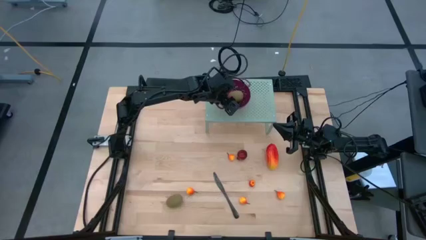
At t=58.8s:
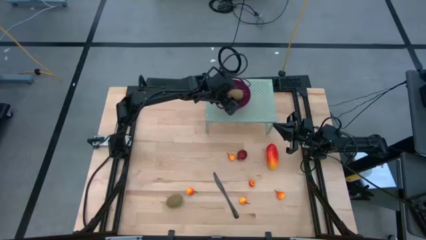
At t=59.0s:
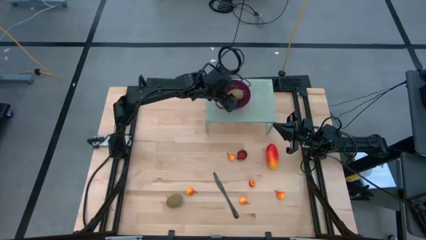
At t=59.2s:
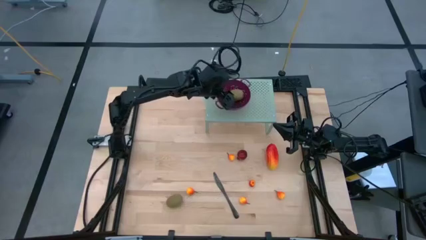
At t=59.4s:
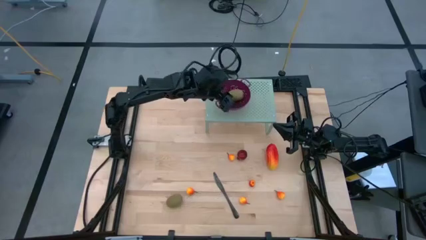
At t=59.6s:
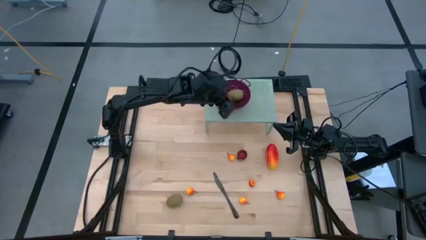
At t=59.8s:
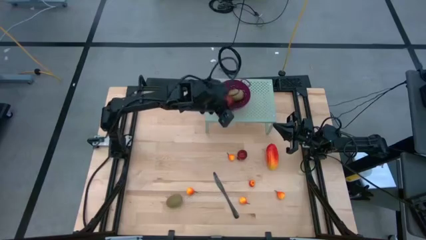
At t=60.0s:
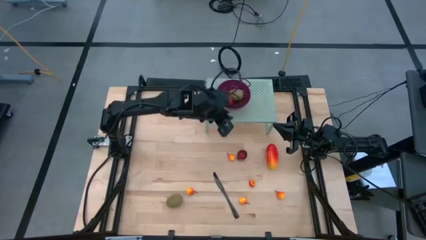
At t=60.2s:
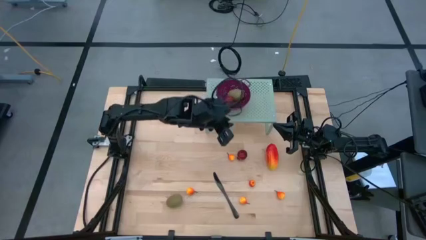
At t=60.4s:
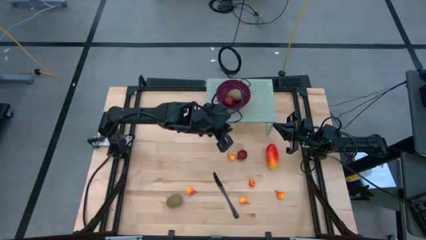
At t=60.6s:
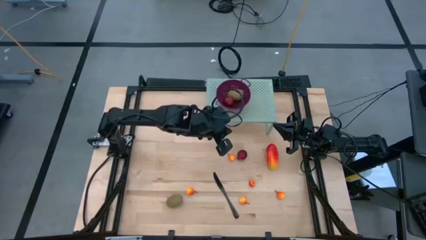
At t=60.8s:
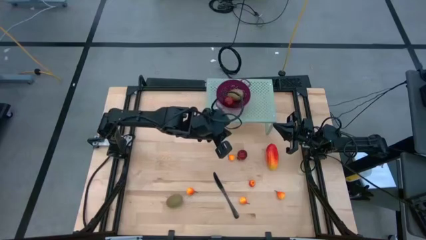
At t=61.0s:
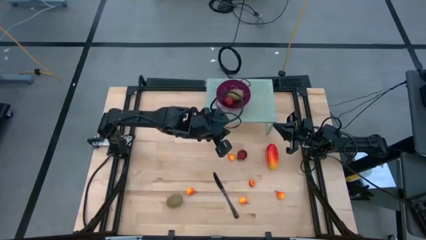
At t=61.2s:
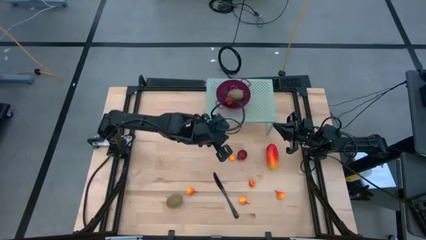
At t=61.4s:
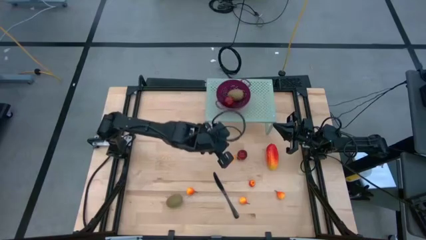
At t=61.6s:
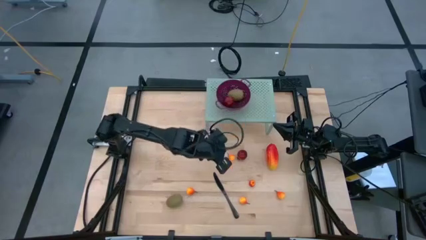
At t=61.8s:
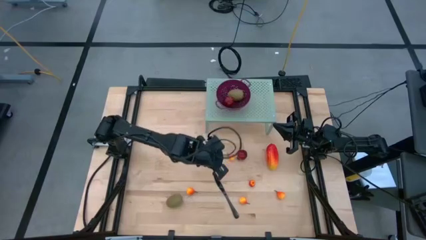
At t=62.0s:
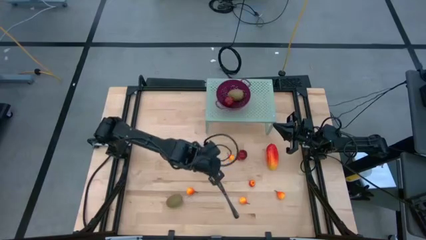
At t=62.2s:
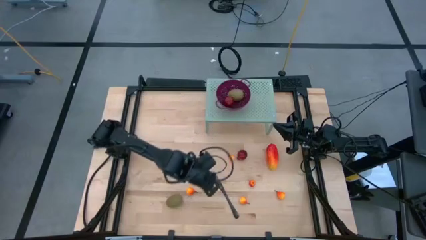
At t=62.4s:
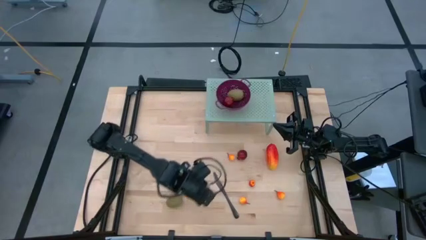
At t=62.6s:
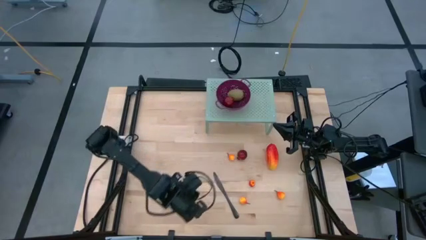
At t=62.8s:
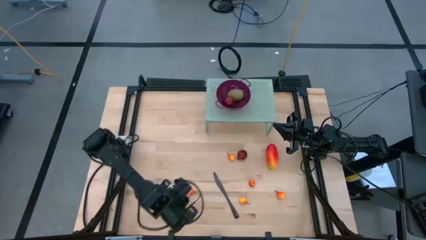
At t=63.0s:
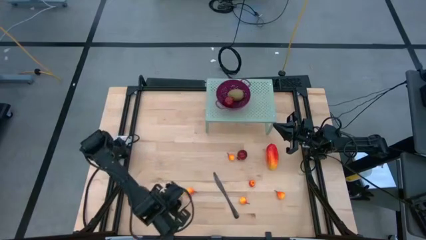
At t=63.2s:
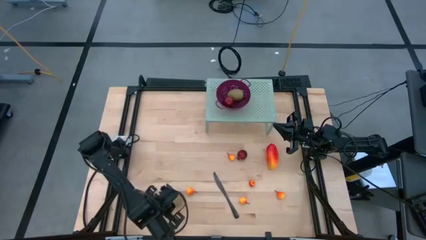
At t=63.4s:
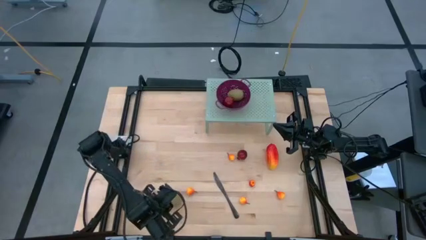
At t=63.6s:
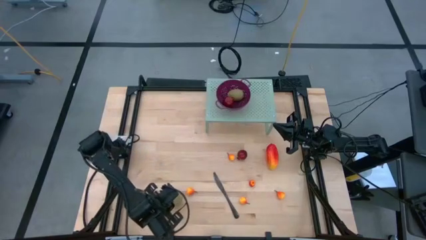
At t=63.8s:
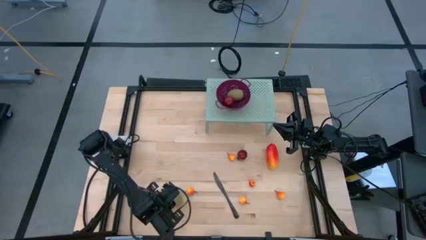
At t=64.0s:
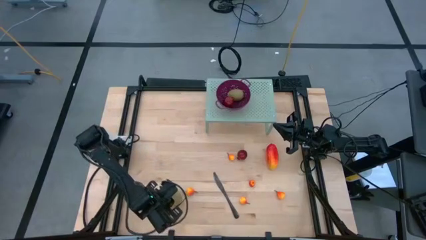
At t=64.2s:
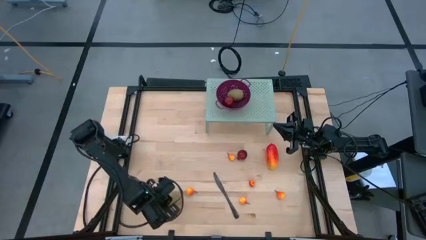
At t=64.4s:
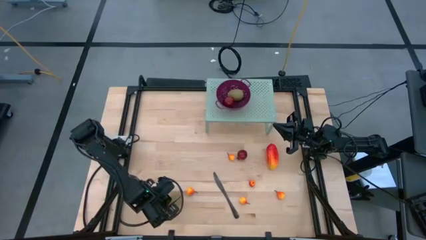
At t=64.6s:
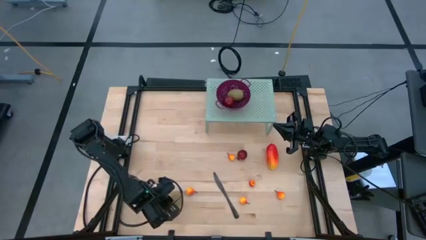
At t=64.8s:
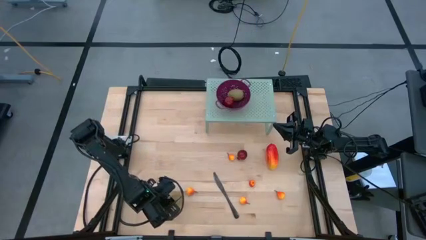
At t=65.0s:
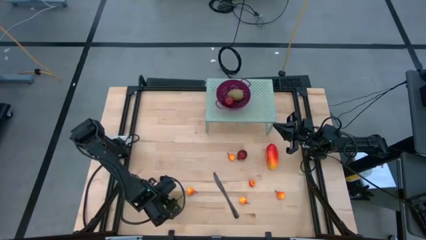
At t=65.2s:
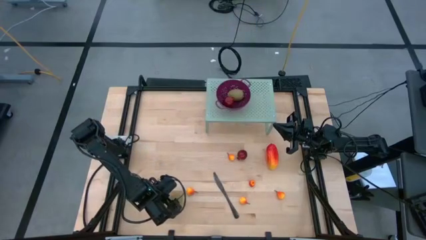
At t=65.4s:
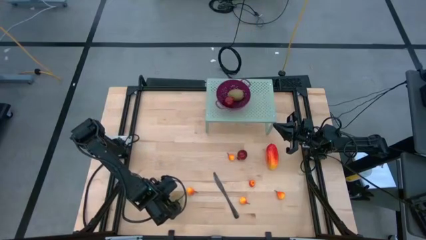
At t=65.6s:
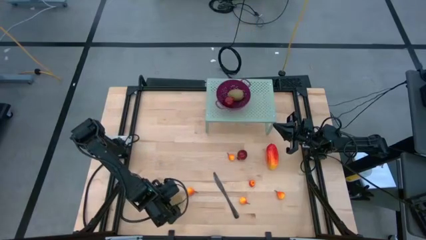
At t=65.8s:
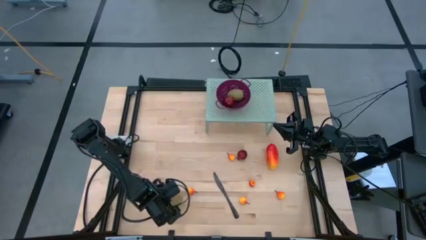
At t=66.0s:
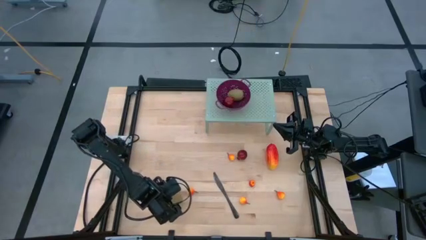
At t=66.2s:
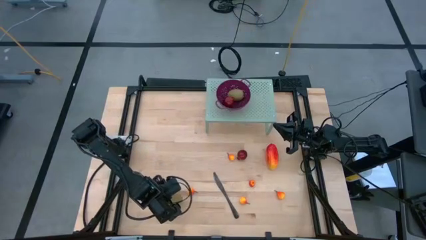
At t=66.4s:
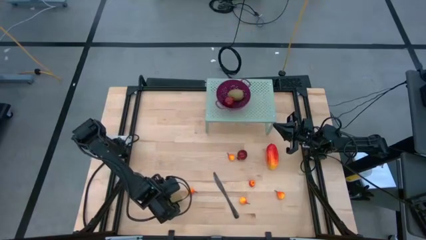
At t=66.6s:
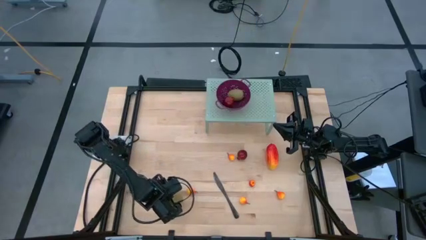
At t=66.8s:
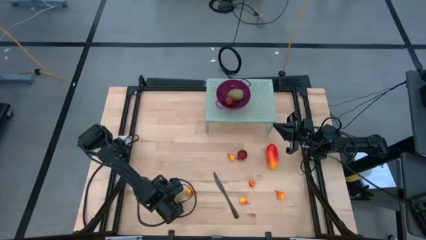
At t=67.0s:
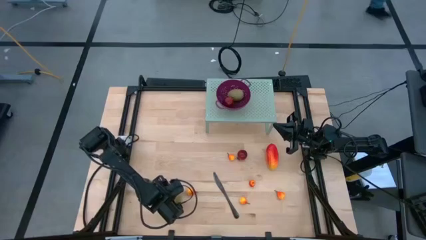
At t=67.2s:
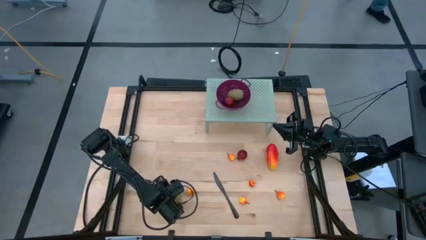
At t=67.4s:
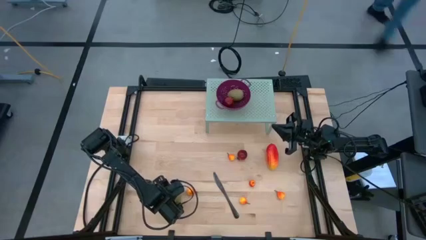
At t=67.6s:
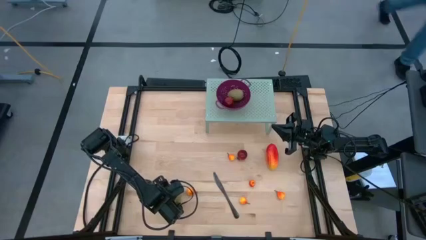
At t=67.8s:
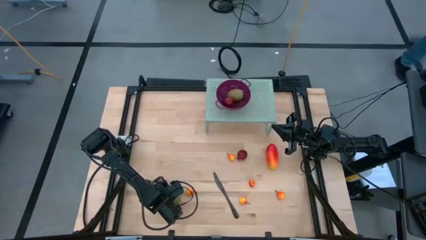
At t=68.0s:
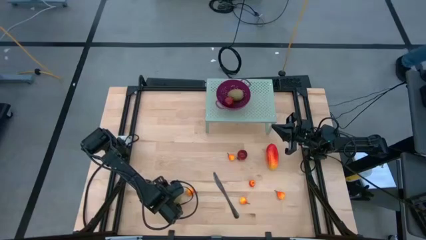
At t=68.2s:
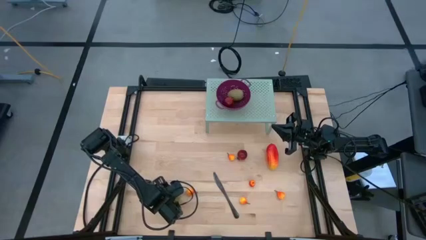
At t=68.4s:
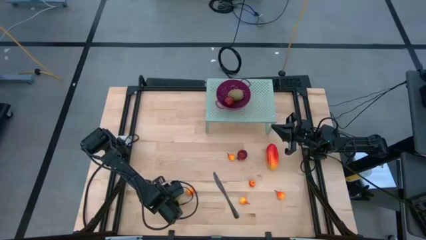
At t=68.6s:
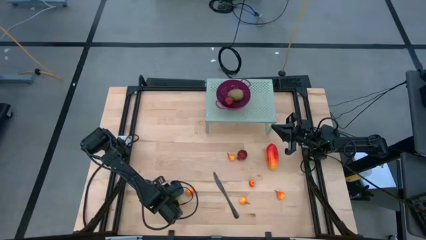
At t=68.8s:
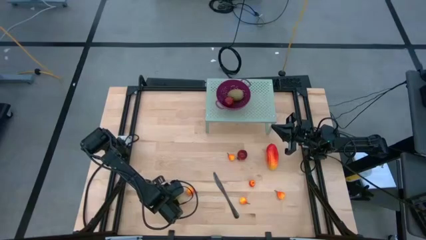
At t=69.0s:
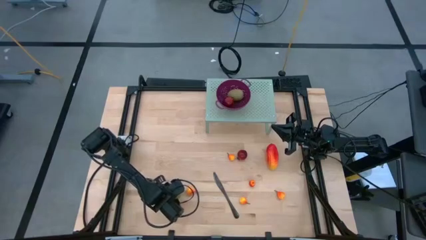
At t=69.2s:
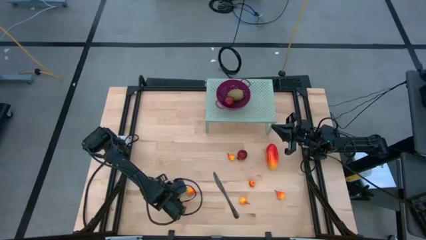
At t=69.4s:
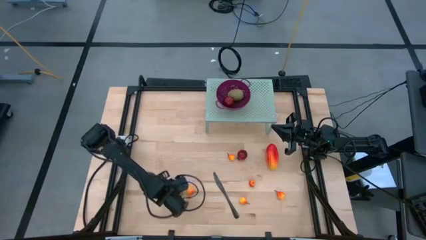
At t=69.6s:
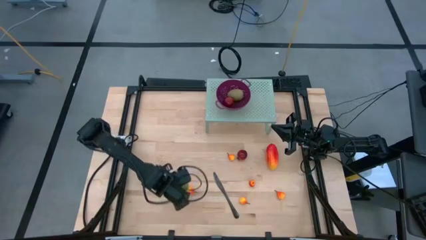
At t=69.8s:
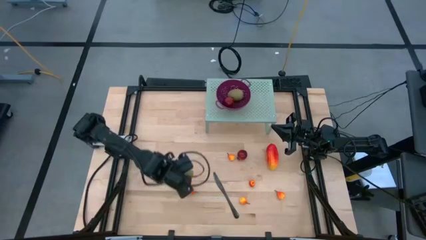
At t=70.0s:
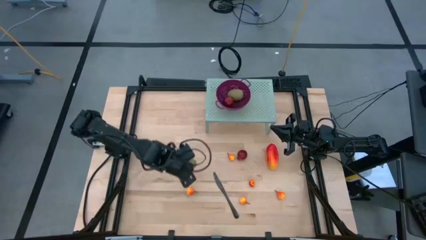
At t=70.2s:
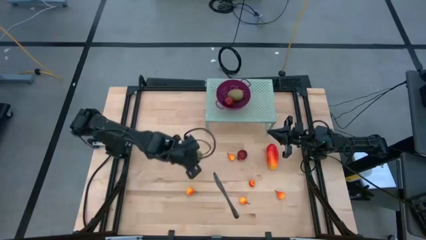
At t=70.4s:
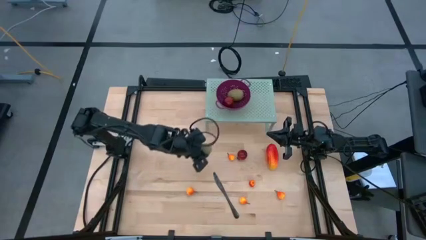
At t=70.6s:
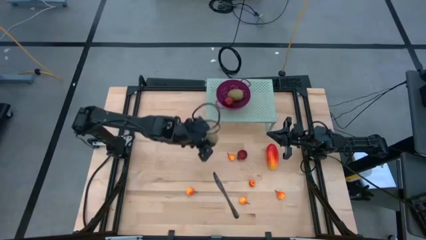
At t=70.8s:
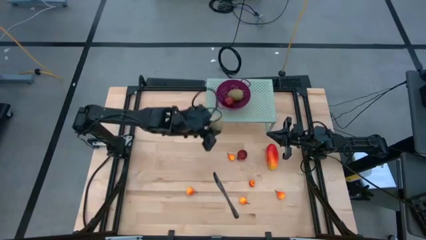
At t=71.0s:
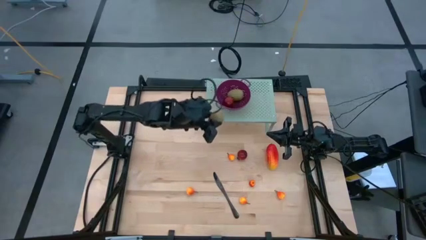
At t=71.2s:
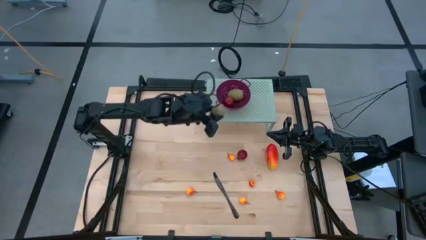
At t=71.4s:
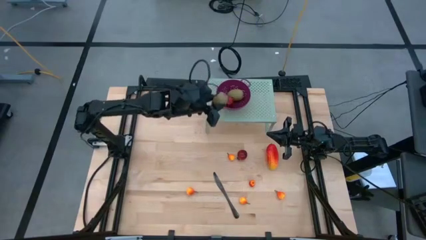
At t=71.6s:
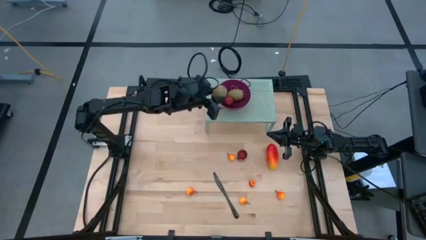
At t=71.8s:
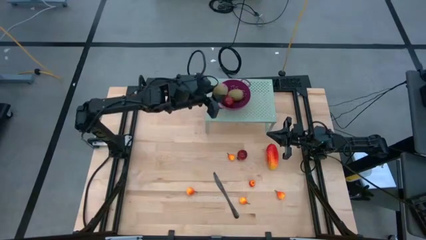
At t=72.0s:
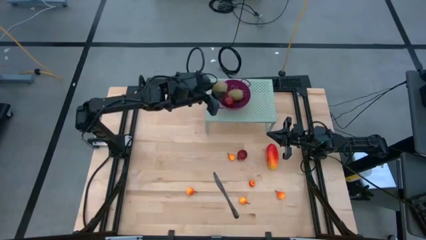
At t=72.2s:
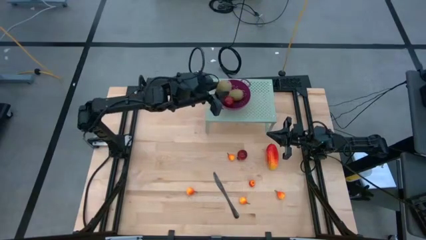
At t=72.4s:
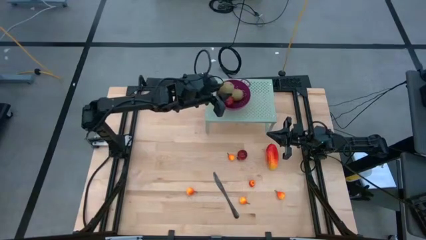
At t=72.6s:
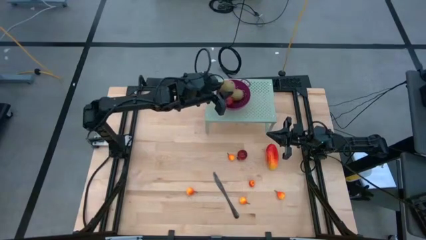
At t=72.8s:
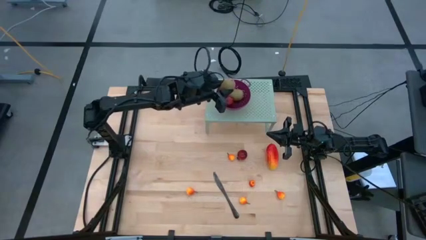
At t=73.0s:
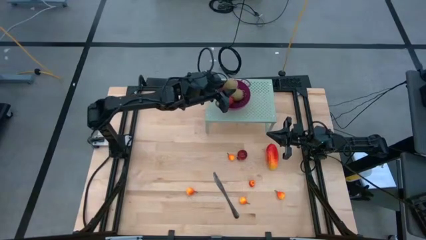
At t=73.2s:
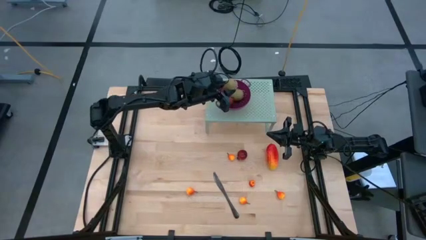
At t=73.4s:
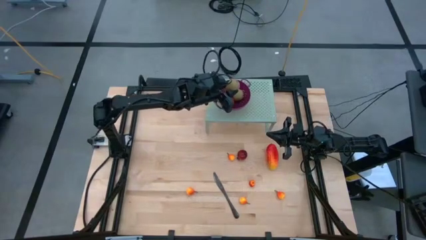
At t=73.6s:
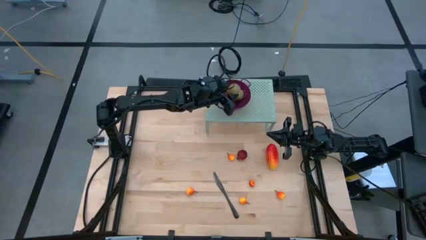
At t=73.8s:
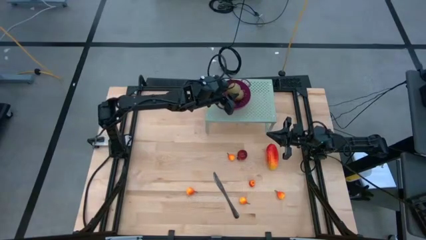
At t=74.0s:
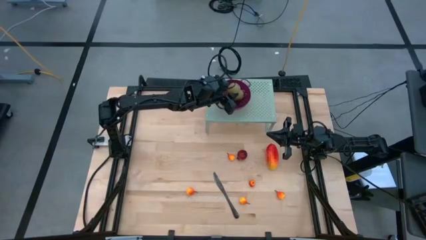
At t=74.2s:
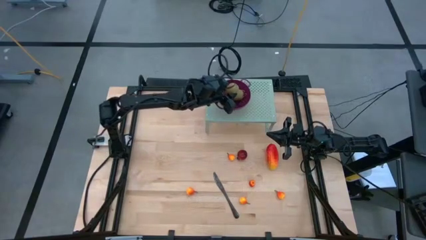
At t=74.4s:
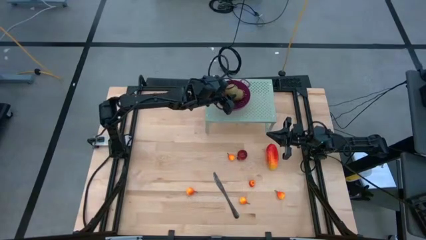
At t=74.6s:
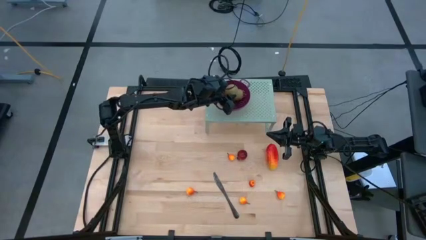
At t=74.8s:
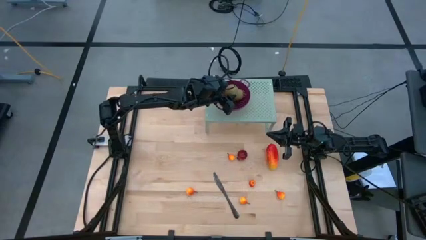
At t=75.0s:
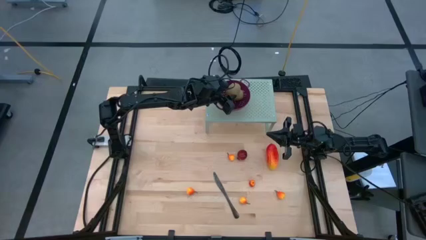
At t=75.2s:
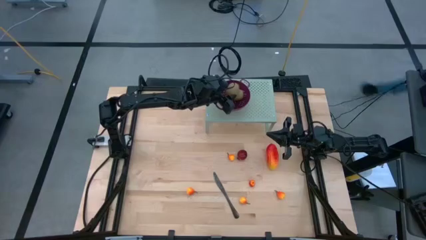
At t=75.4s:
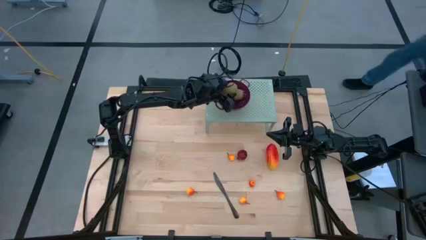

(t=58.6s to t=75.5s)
Task: Pick & Place Fruit
Put the brown kiwi into the violet strainer bowl on the shelf
